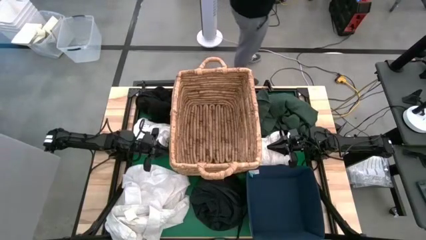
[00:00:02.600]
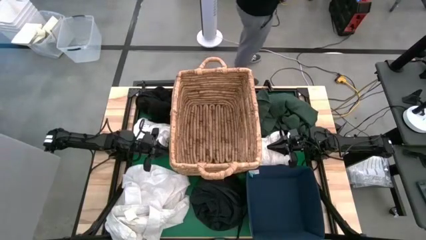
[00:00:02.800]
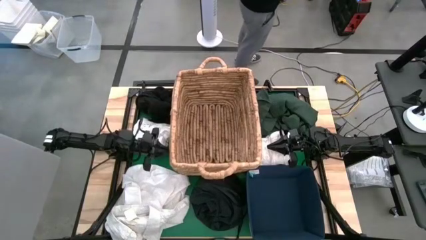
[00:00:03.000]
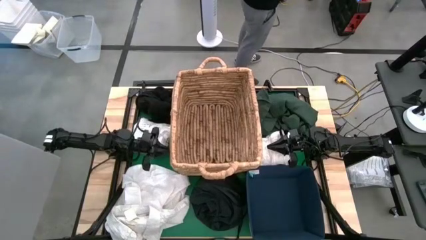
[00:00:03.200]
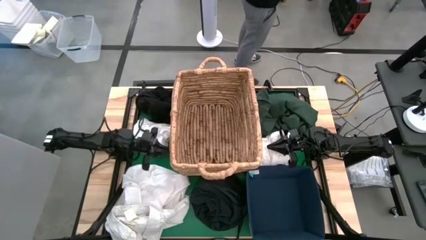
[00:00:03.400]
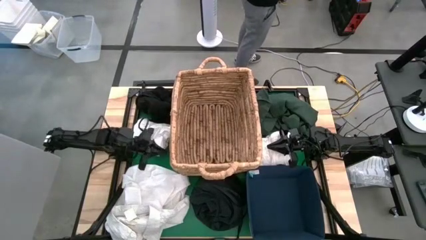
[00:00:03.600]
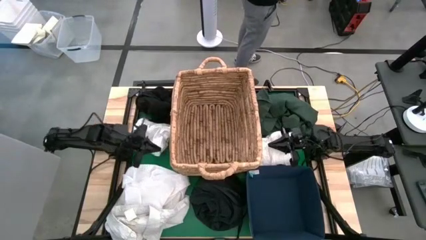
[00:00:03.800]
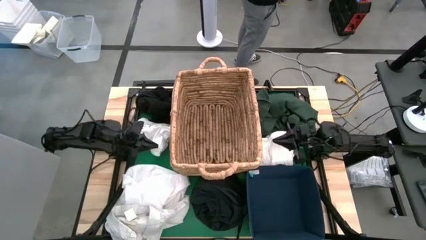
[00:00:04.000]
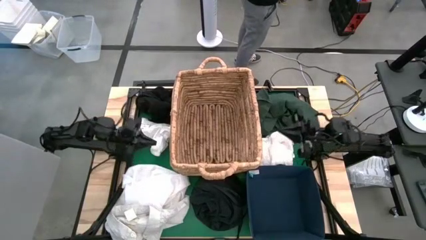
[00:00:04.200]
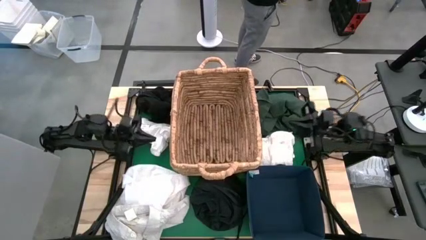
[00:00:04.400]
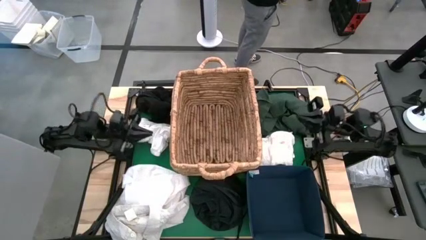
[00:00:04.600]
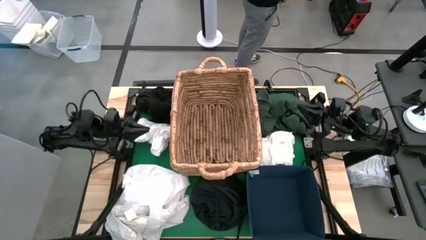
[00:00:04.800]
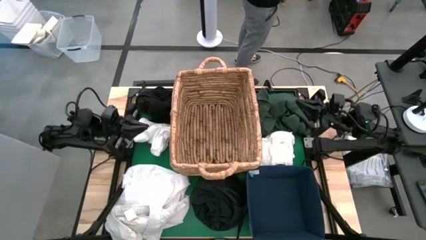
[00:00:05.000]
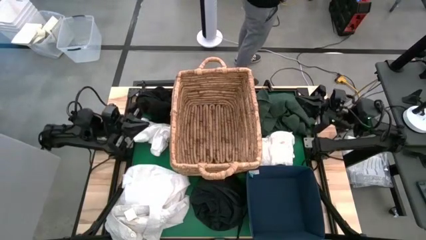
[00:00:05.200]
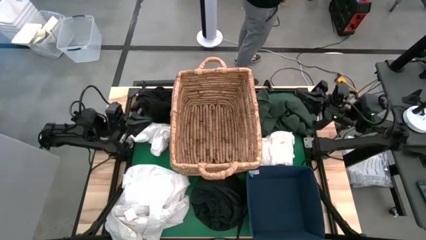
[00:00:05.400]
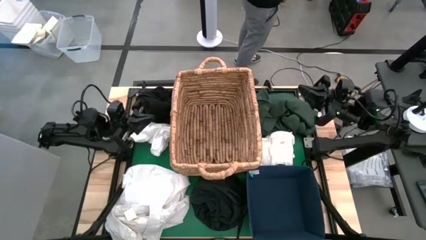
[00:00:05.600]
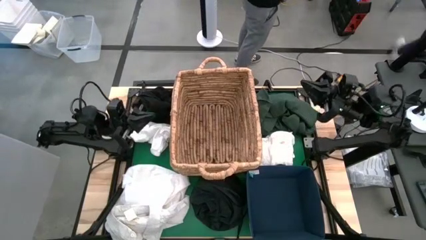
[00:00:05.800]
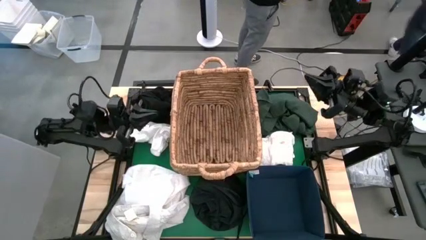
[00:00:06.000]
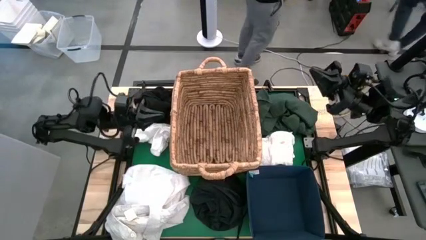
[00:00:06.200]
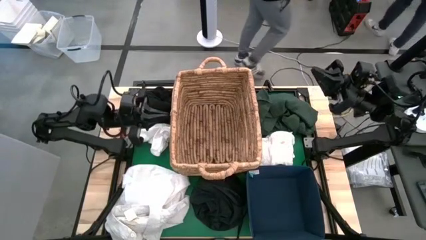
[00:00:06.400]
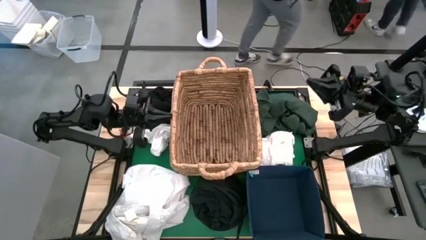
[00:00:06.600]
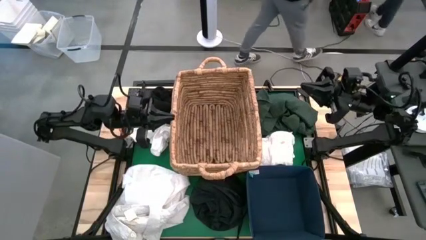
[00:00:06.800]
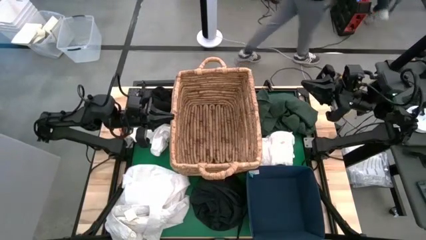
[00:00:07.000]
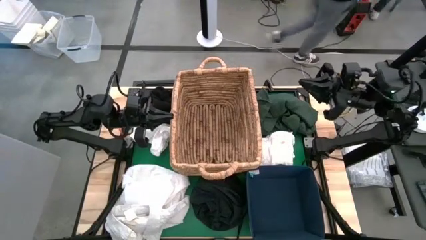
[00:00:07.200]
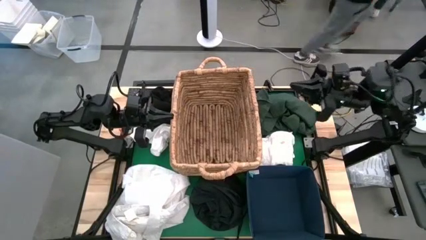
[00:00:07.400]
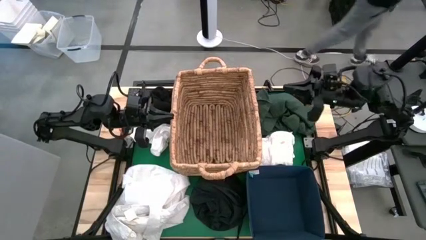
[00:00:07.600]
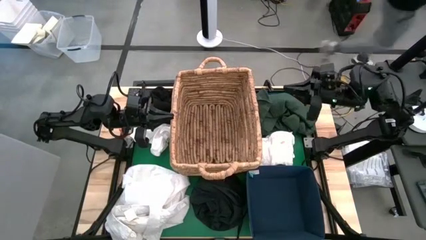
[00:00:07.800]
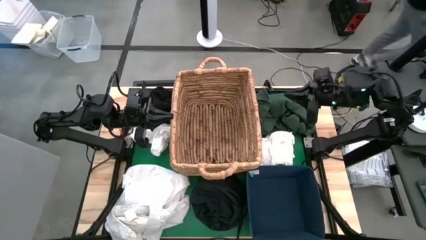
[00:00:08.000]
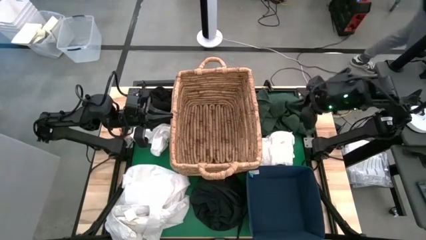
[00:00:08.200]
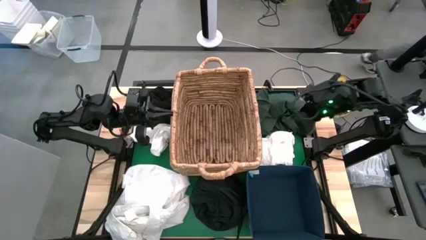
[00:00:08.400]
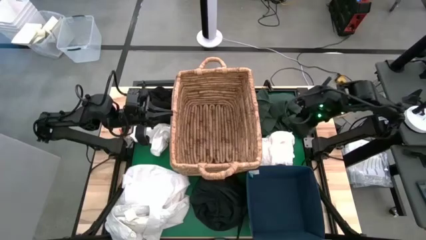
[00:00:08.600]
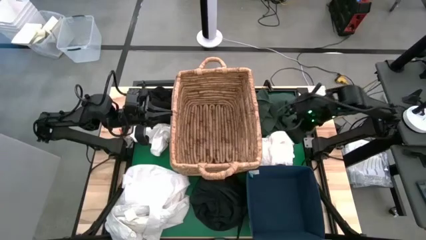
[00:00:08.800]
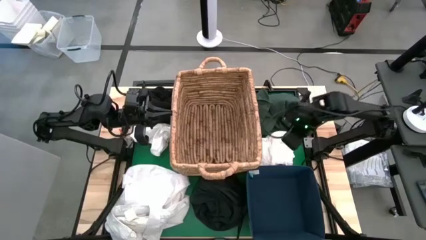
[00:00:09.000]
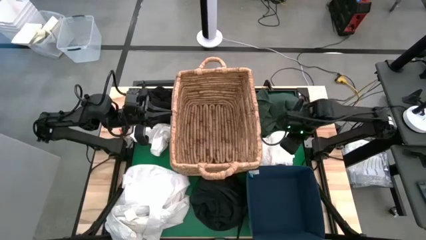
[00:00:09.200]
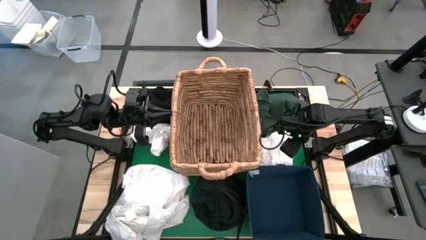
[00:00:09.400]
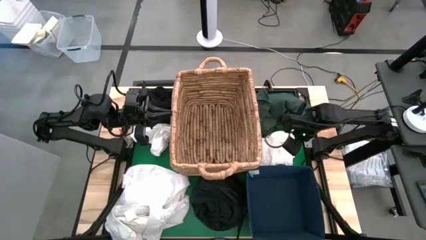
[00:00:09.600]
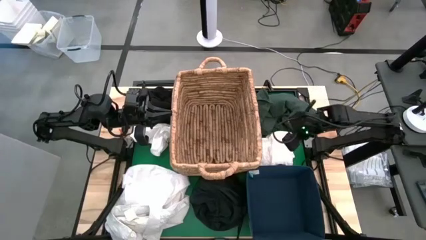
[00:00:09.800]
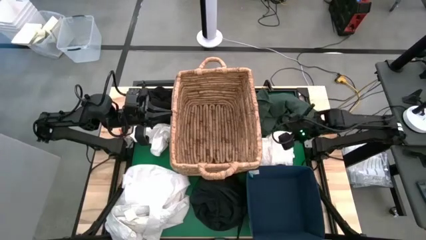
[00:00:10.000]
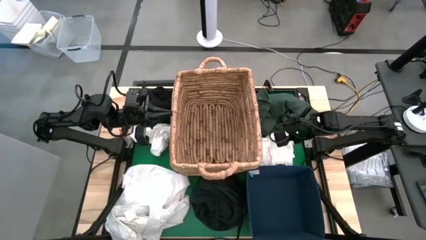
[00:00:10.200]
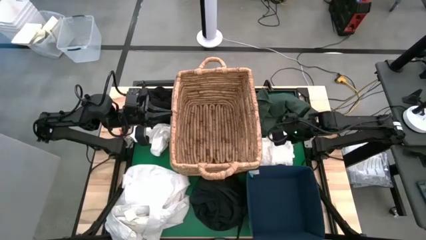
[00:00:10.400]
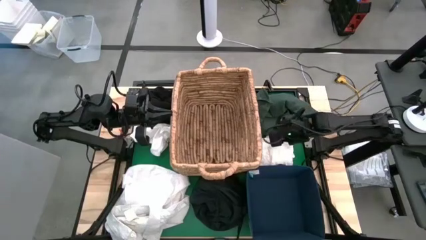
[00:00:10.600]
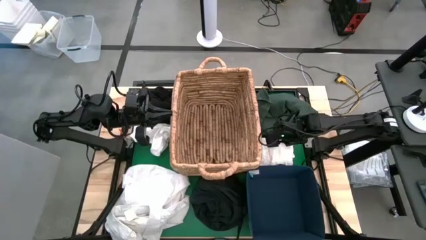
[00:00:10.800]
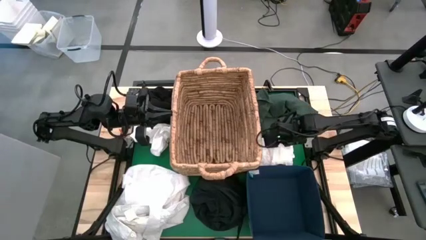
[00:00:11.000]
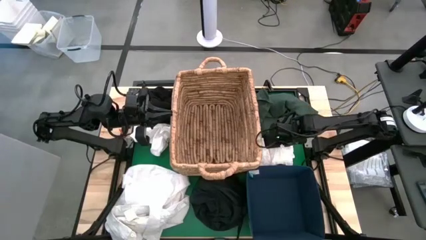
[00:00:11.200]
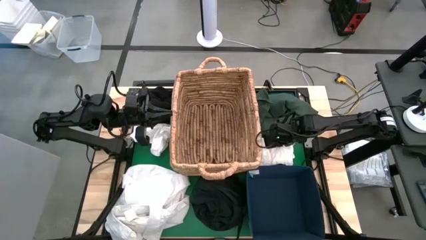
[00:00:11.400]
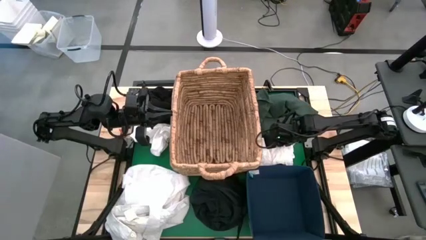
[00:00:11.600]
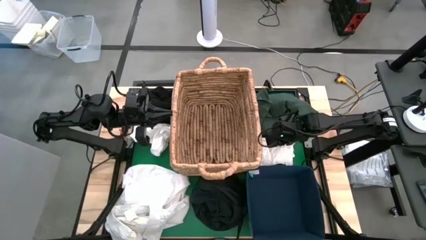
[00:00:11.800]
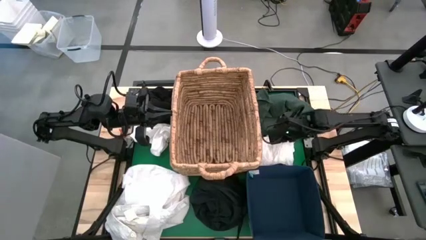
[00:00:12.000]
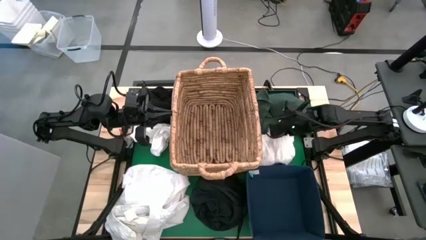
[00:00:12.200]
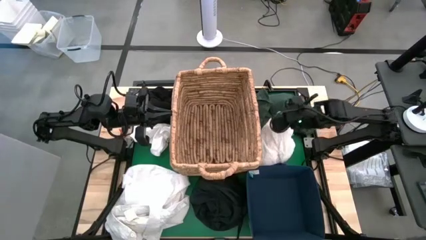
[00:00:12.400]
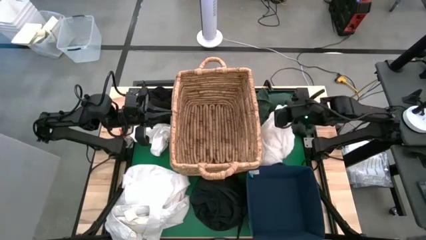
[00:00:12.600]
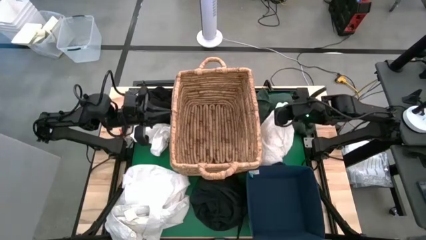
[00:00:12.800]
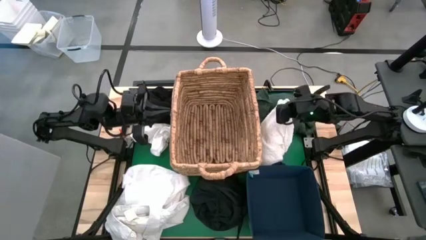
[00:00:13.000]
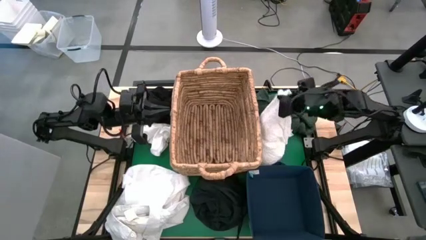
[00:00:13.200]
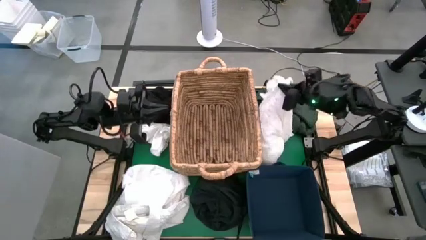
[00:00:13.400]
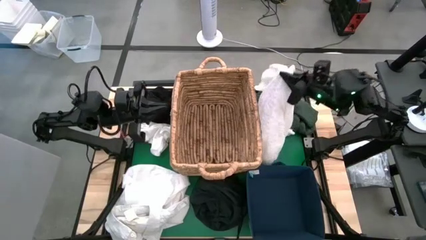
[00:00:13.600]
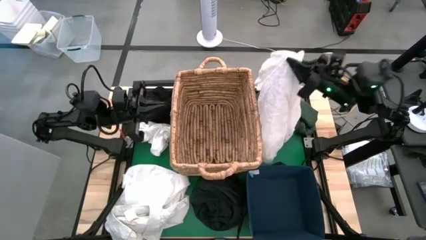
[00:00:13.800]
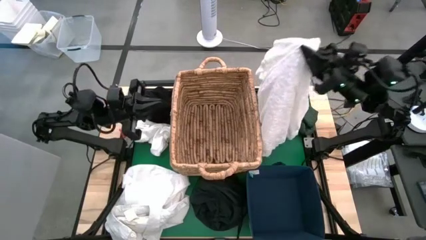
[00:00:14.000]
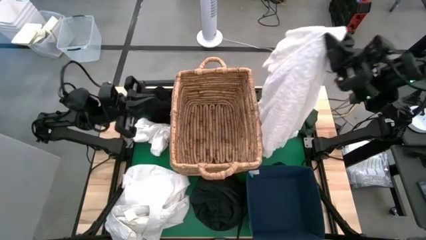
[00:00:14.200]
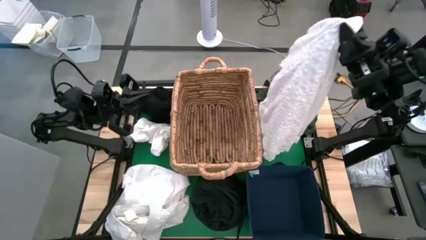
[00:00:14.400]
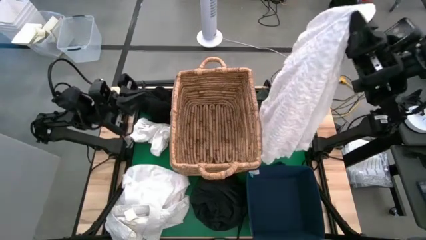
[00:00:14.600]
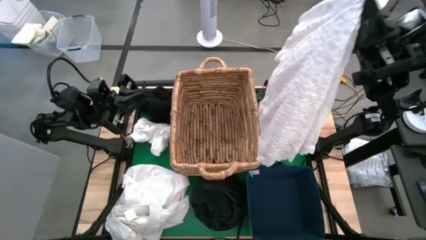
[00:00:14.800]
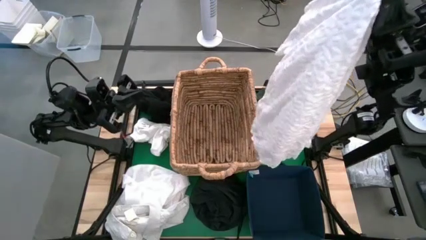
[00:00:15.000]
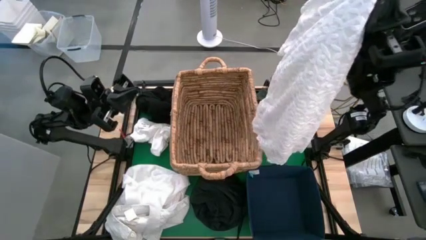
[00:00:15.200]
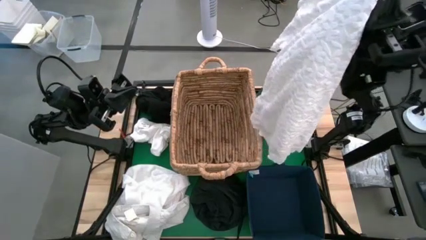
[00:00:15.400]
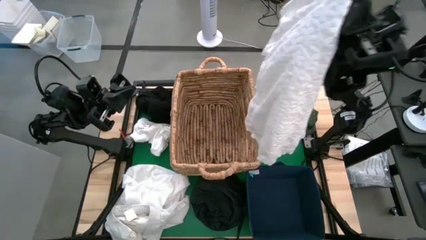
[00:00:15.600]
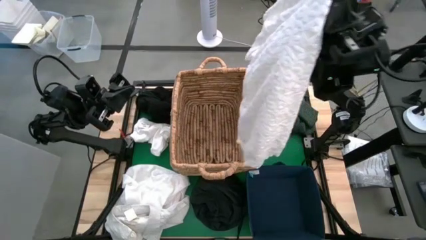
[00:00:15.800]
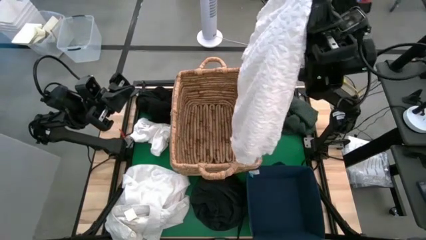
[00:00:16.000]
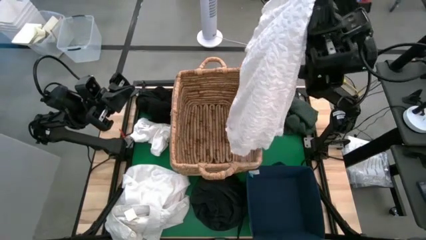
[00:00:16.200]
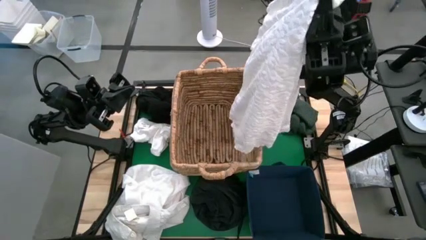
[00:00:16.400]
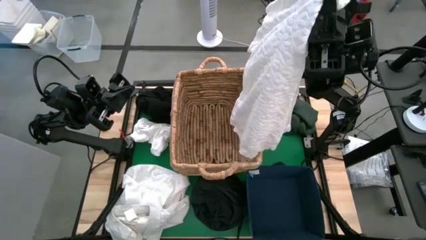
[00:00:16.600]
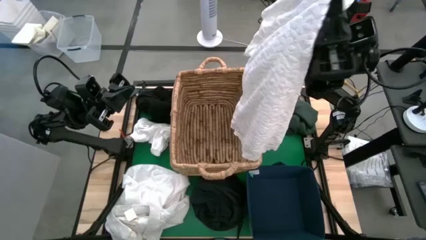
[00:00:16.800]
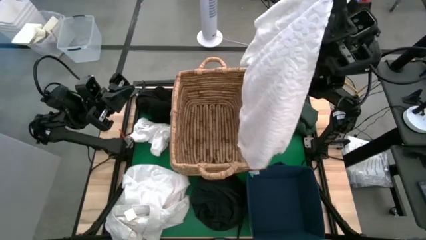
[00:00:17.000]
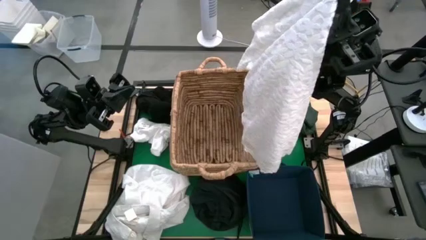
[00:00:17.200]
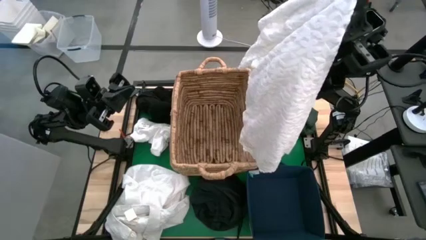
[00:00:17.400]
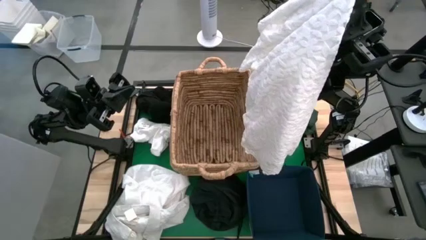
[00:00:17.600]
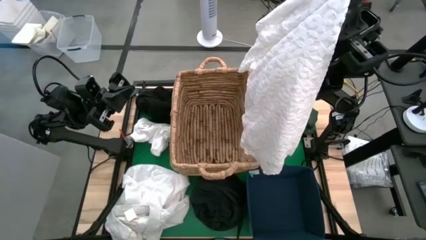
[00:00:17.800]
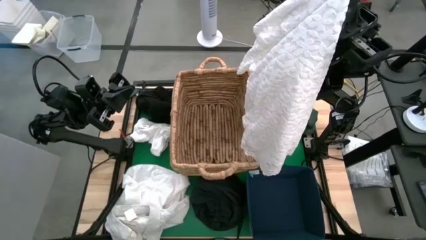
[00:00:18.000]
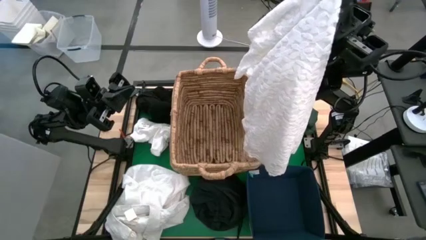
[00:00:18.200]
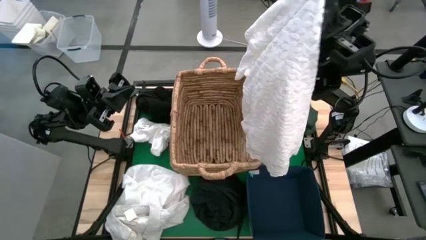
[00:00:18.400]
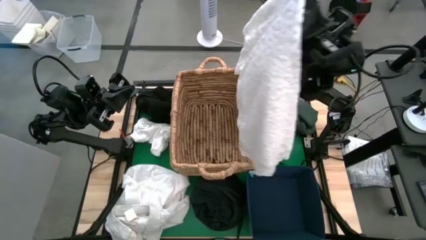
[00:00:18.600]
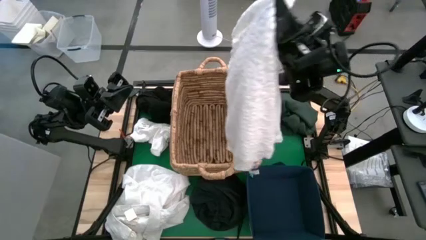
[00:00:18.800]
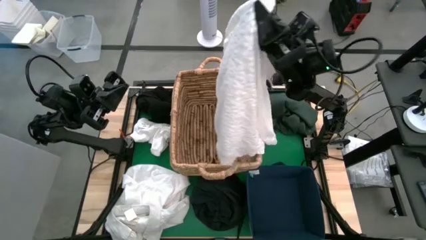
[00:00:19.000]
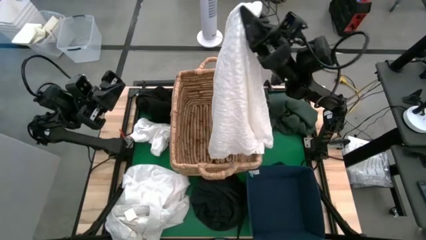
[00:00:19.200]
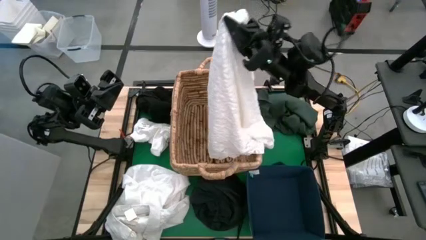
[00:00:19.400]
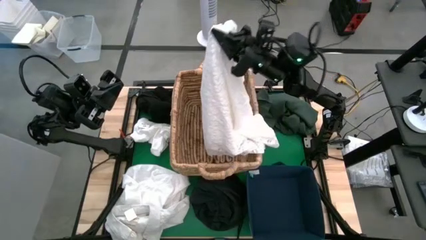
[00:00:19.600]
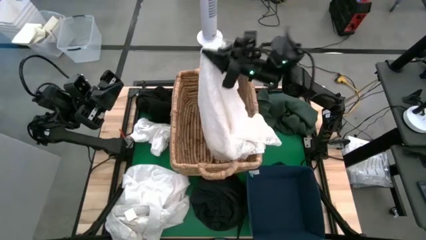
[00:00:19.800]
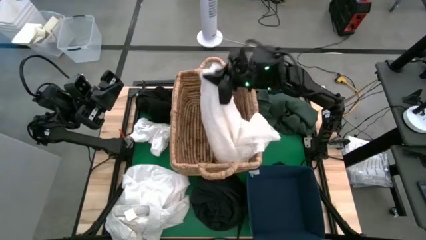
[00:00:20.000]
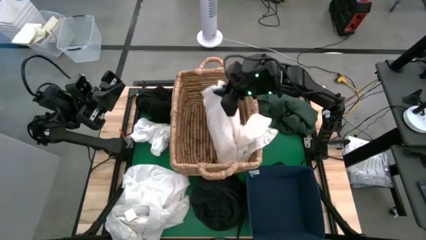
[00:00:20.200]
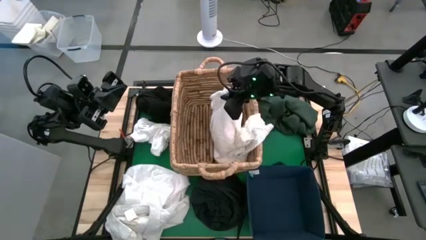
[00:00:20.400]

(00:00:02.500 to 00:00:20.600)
Put the white jacket into the basket
